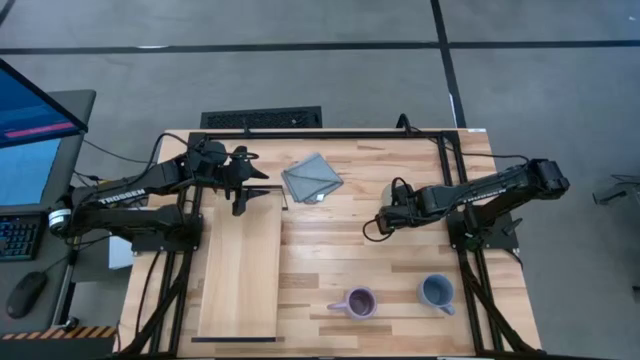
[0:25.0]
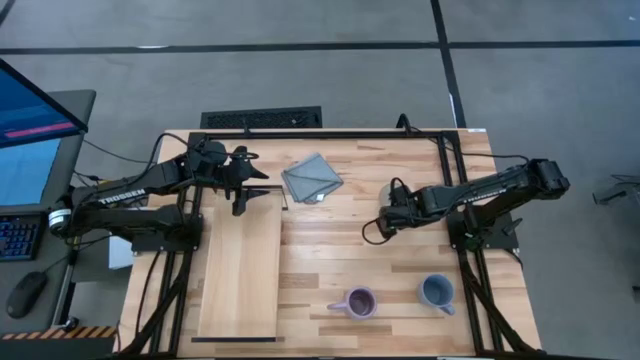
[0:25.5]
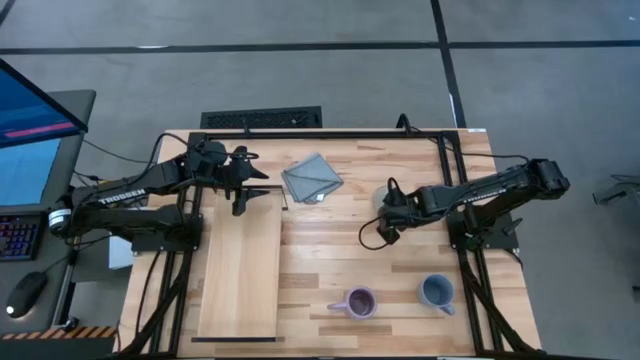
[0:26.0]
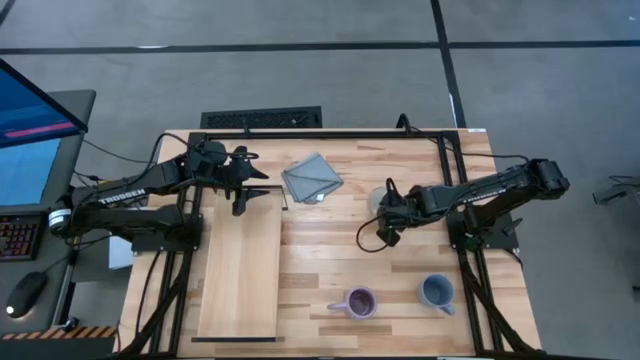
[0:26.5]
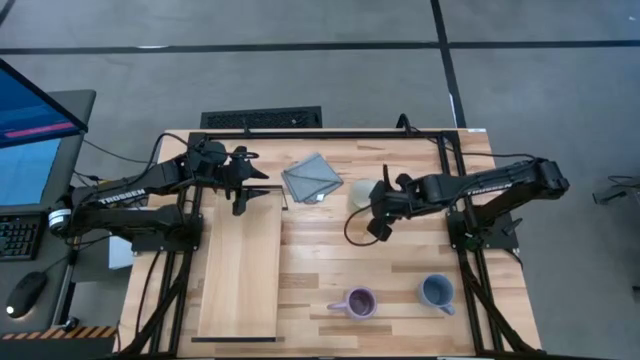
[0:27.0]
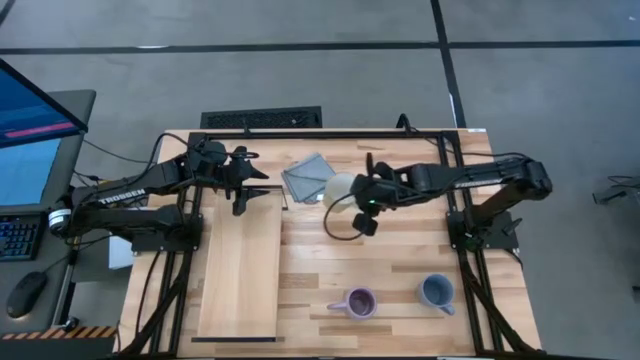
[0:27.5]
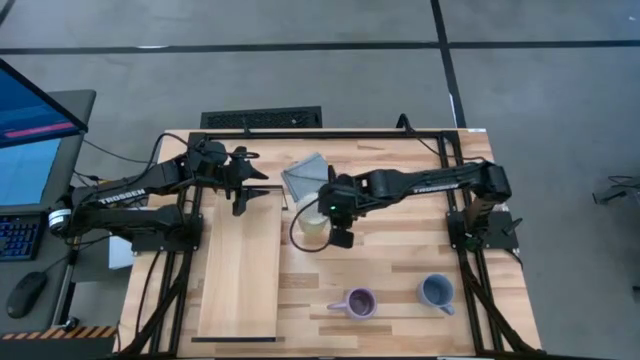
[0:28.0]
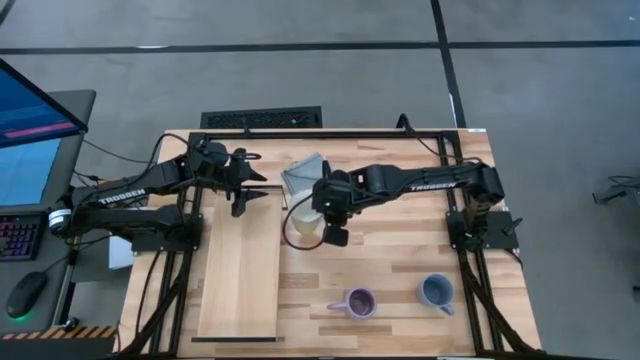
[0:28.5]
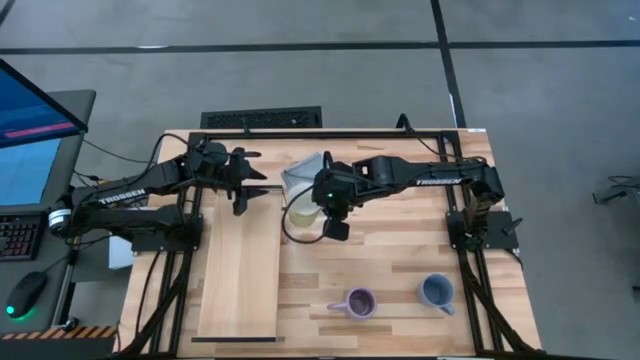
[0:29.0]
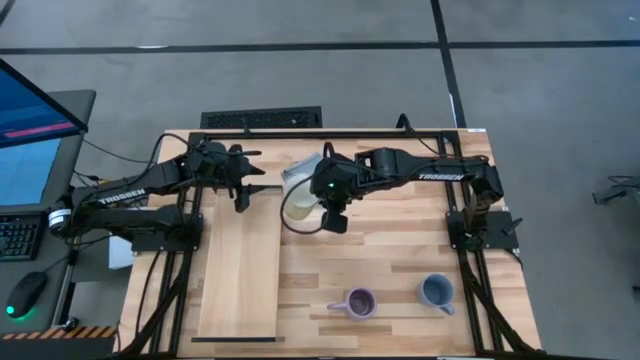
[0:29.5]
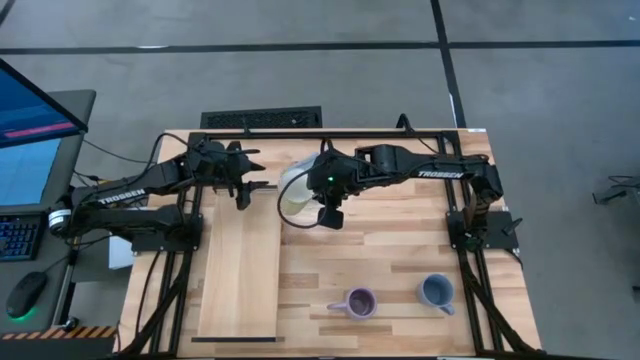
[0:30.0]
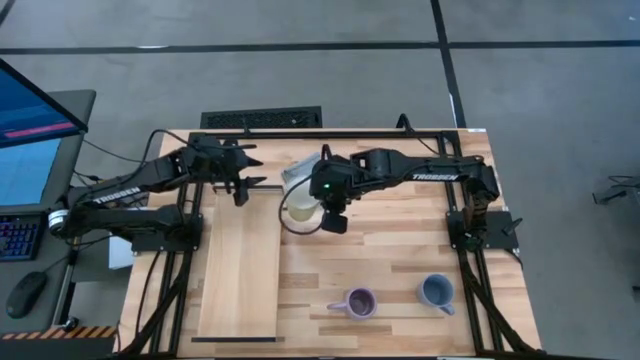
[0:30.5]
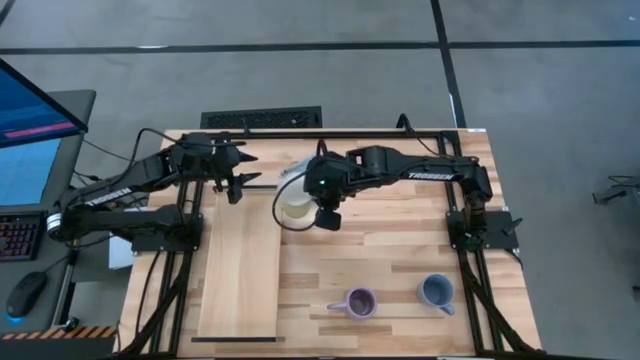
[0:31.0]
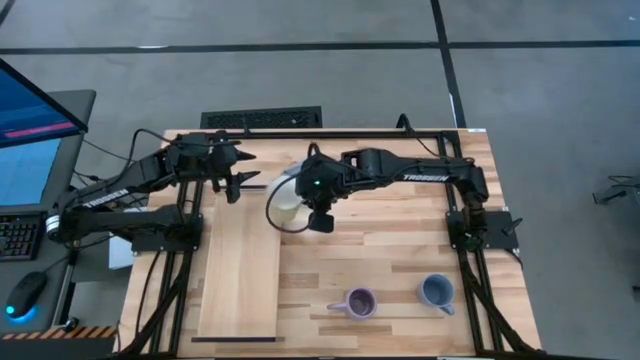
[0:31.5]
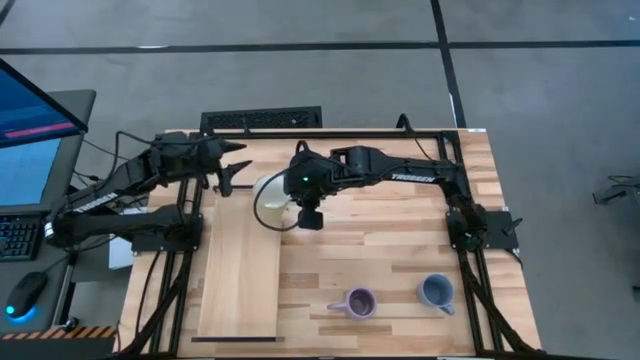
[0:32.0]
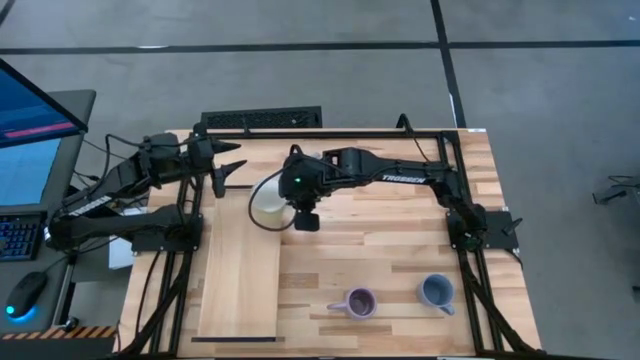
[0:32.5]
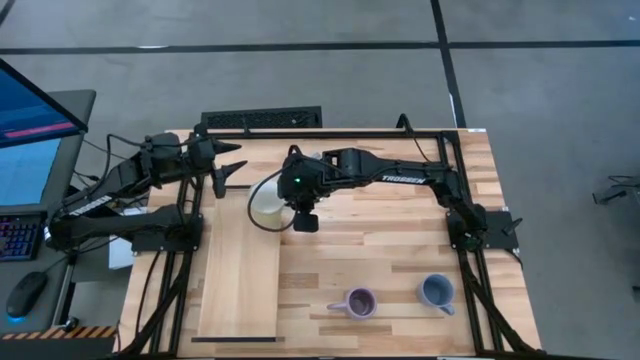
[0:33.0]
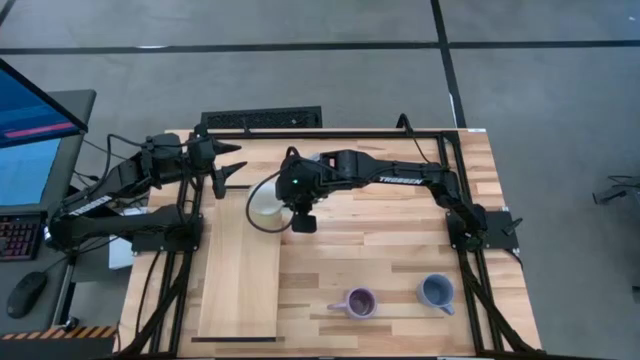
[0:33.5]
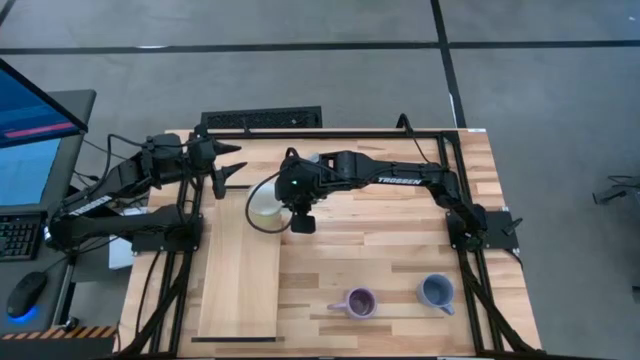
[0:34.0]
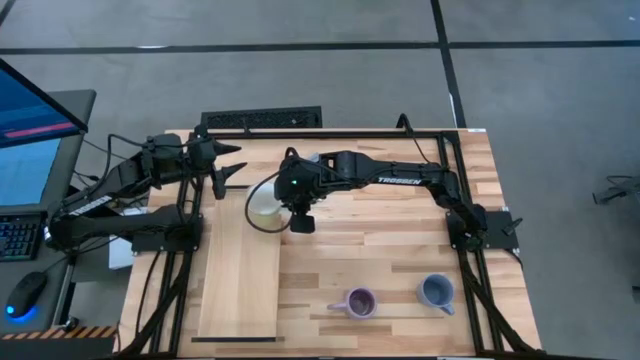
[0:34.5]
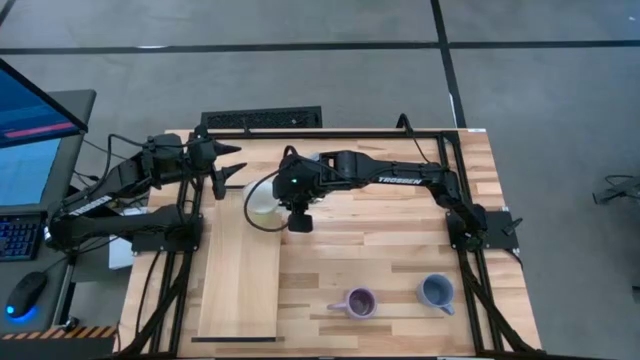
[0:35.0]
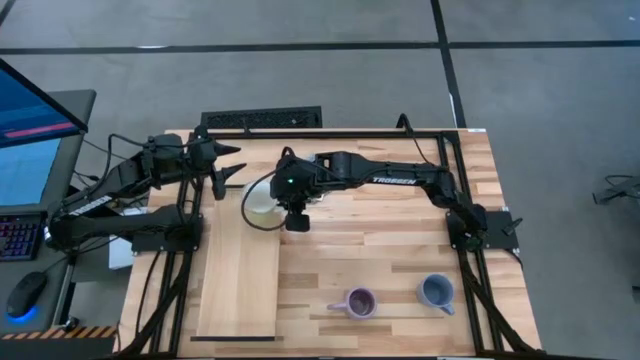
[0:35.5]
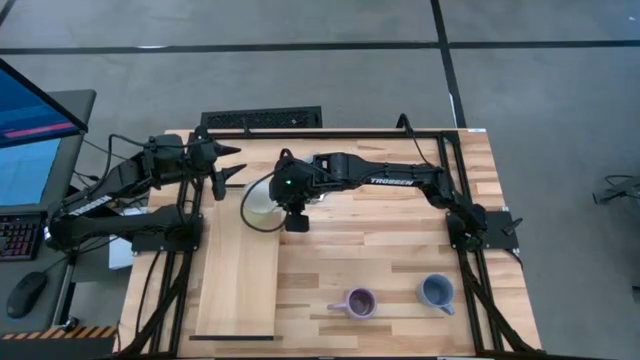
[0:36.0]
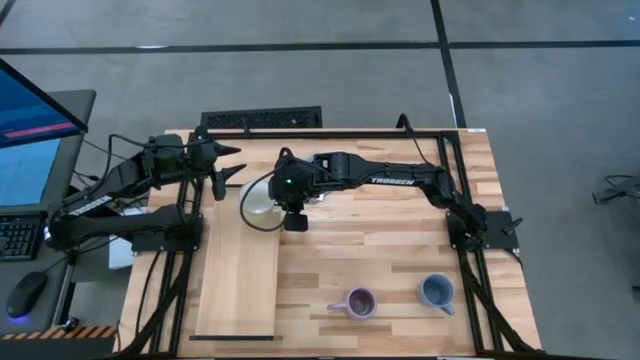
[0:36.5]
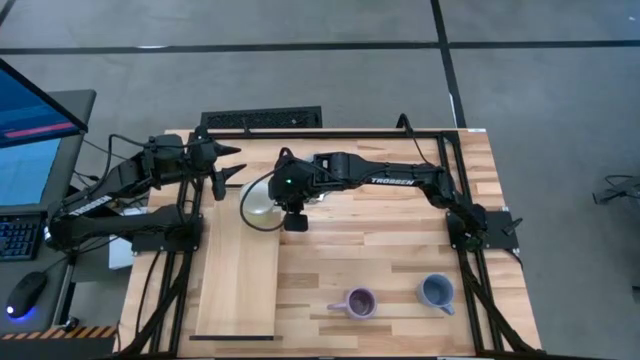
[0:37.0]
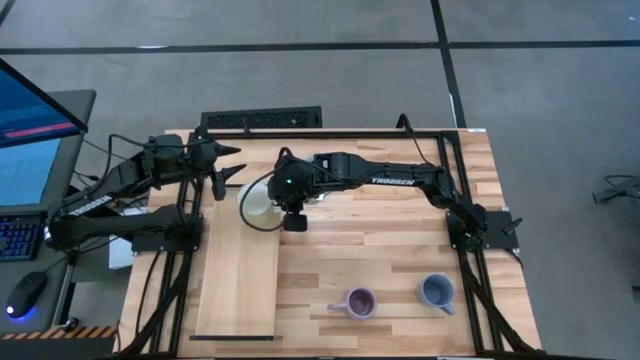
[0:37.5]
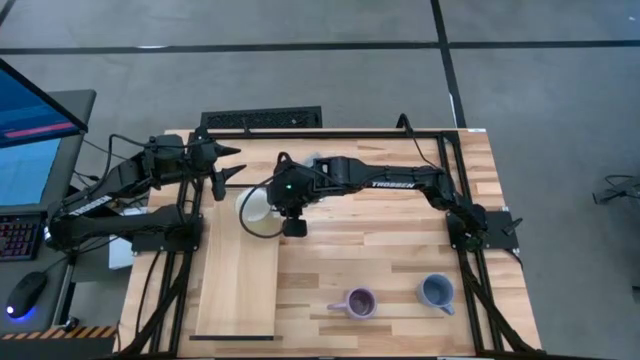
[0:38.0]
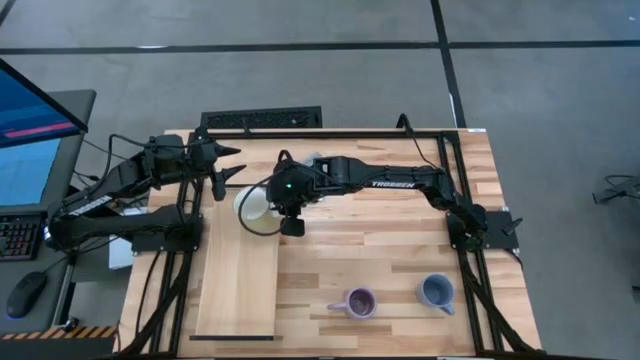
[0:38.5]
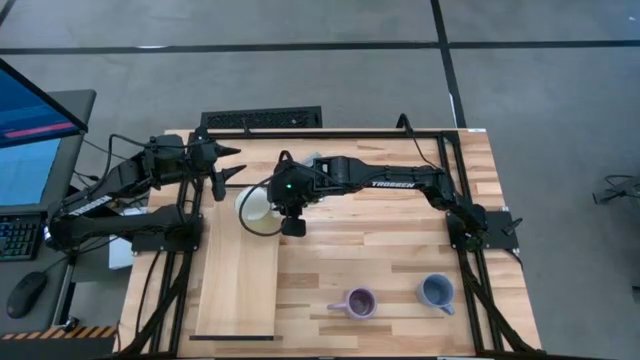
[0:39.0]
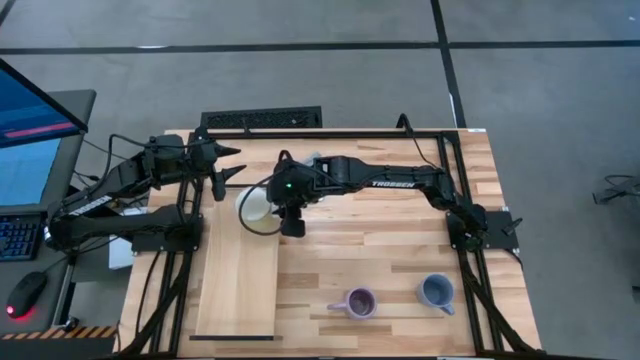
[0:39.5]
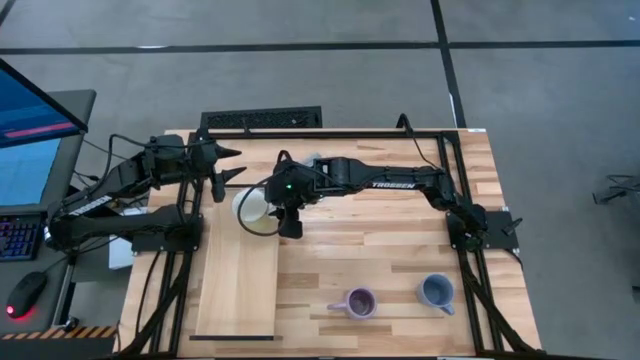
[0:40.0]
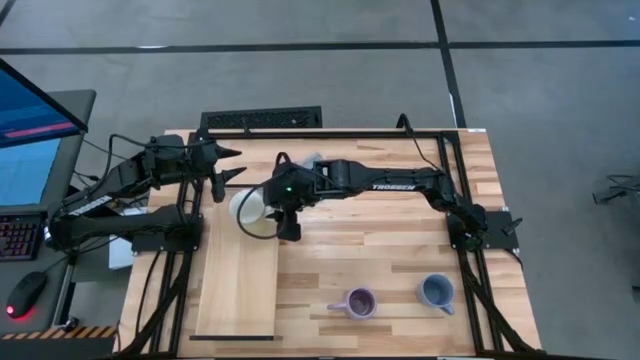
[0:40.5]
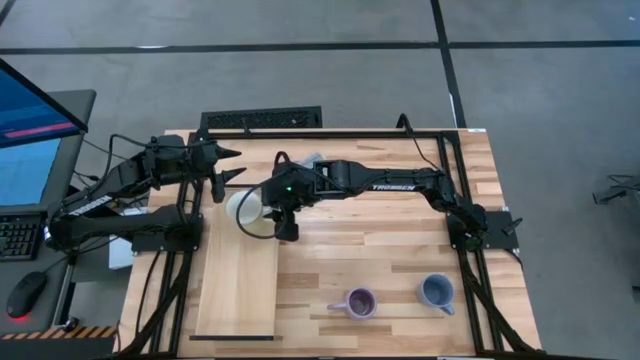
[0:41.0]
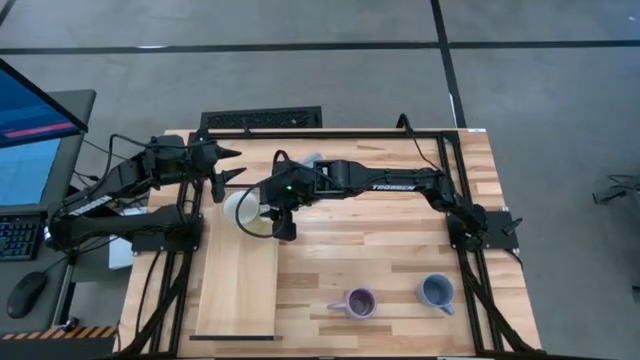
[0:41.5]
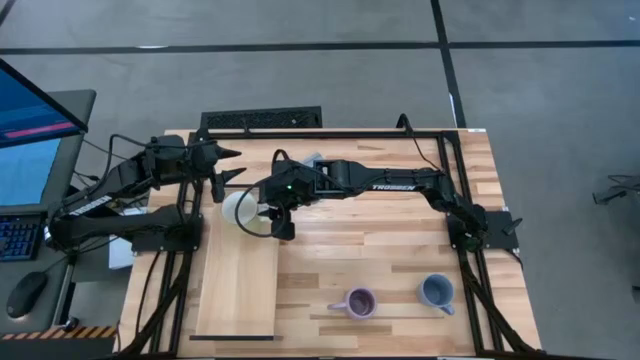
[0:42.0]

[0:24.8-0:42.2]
Task: Stack small to large cups/mugs on shelf
Put the yellow mug on the shelf

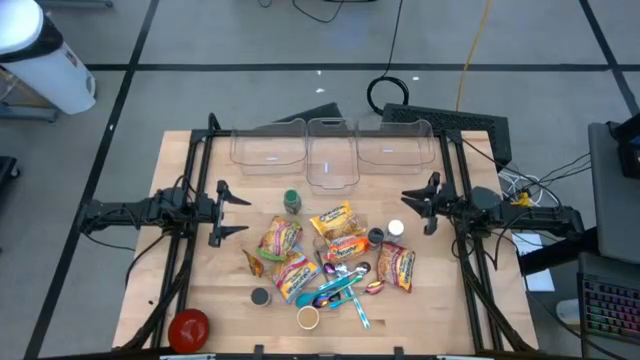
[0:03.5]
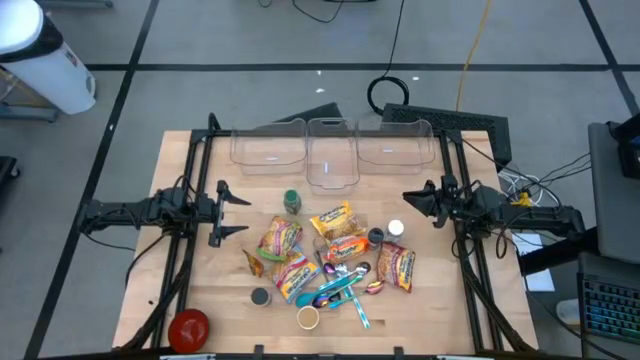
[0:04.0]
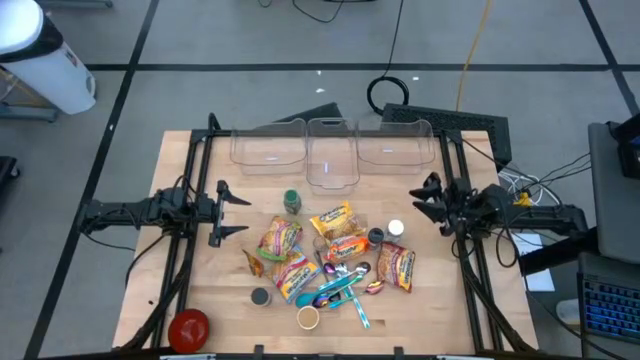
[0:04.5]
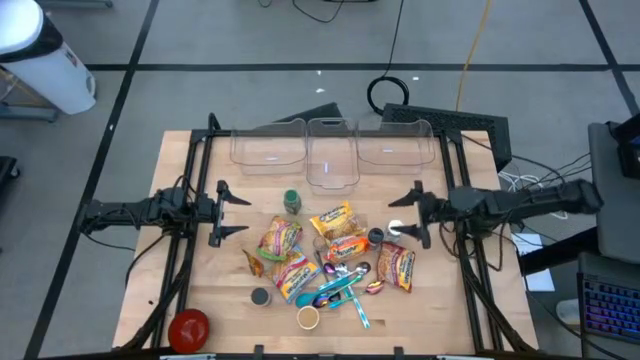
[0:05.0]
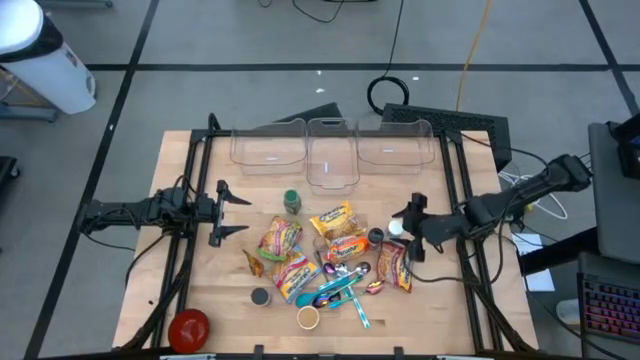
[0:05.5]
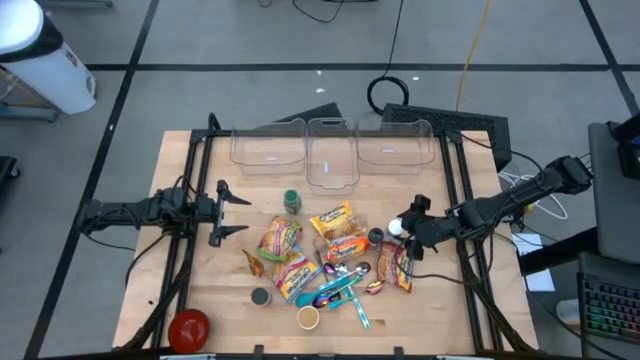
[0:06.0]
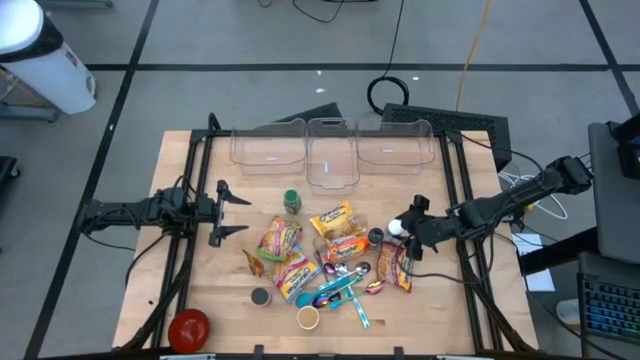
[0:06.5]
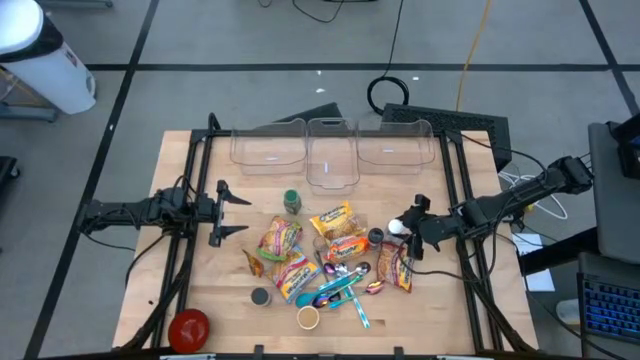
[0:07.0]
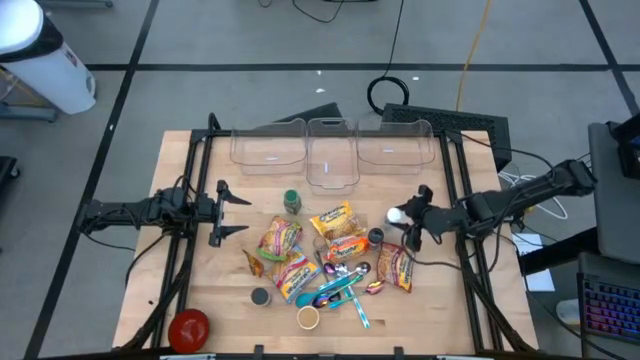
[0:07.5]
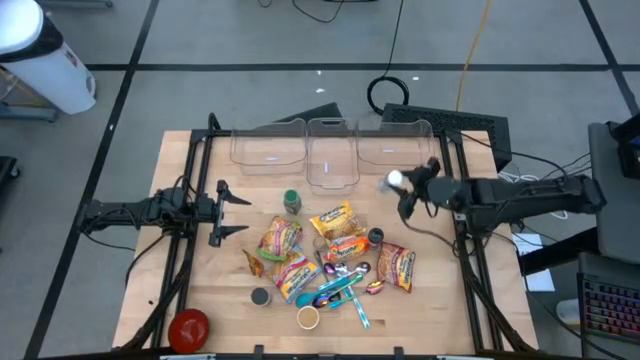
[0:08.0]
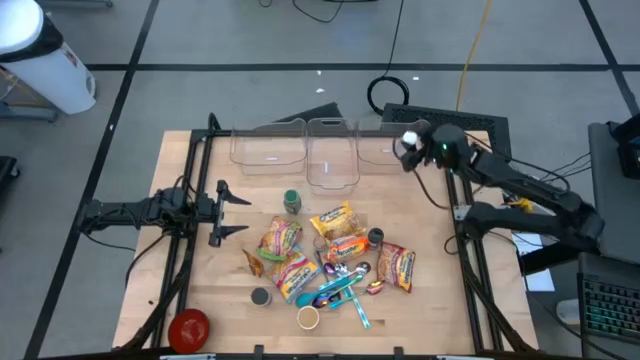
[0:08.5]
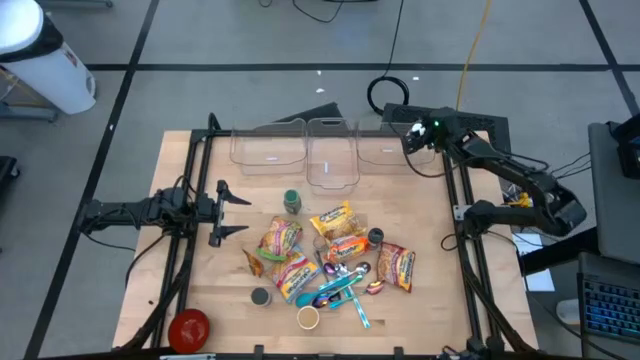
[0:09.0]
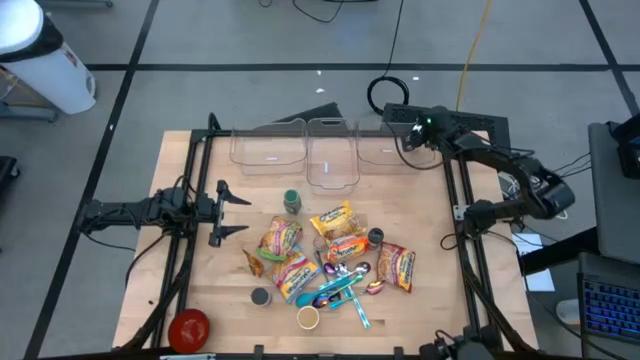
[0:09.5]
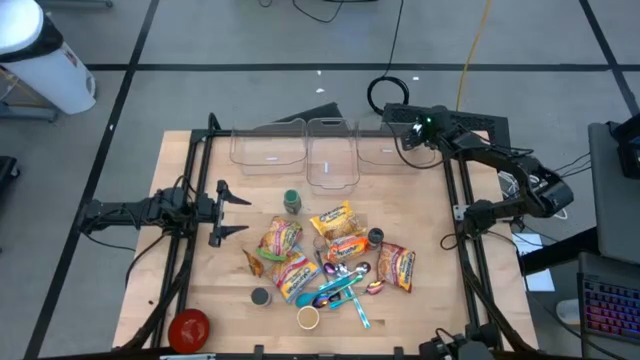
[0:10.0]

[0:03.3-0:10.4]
Task: Pick & Place Food Item
Put the white seasoning bottle into the right transparent bin
